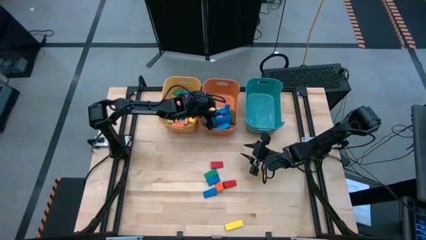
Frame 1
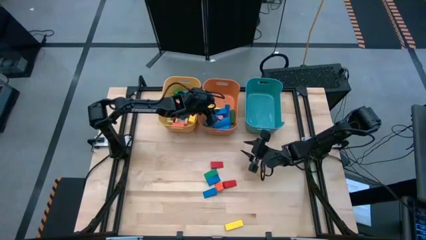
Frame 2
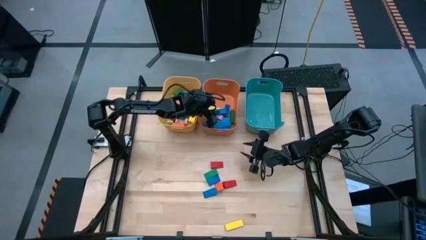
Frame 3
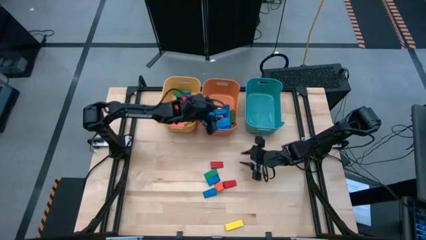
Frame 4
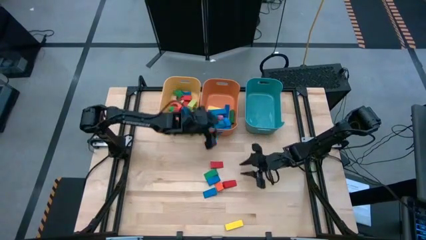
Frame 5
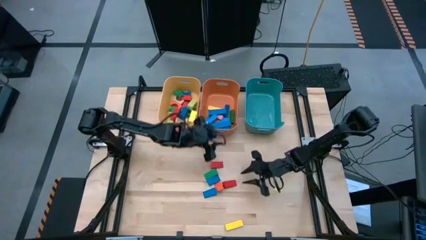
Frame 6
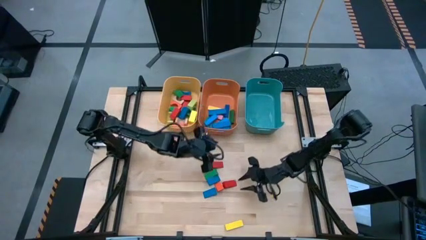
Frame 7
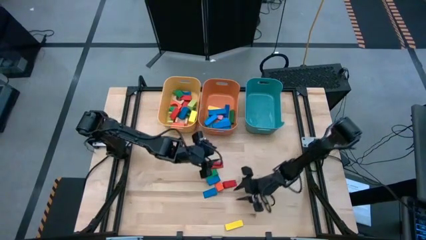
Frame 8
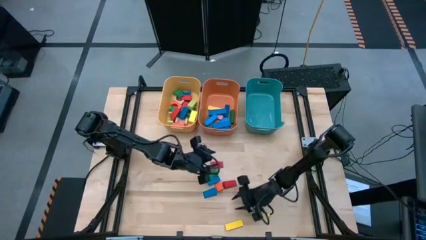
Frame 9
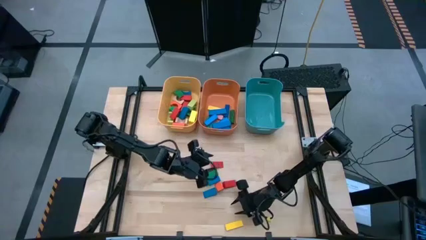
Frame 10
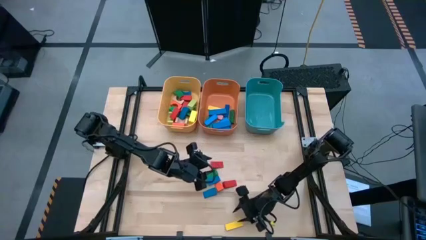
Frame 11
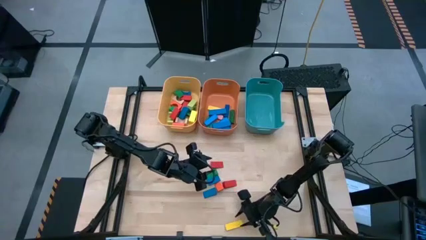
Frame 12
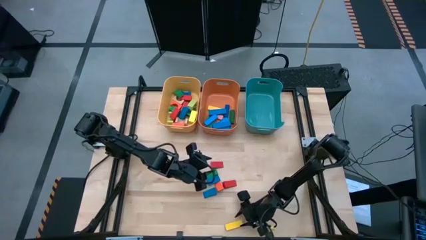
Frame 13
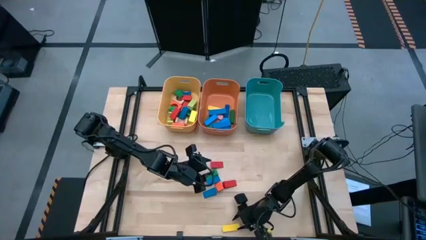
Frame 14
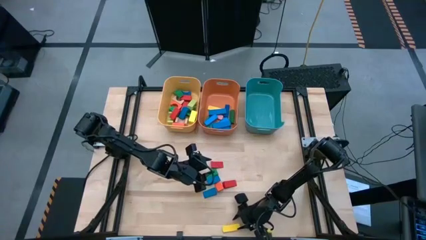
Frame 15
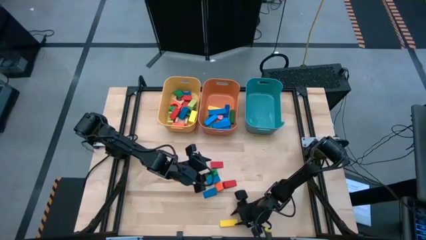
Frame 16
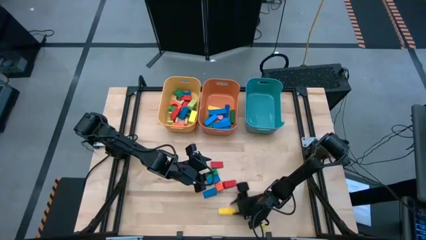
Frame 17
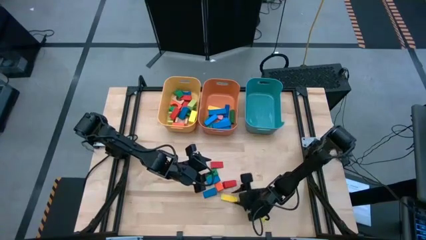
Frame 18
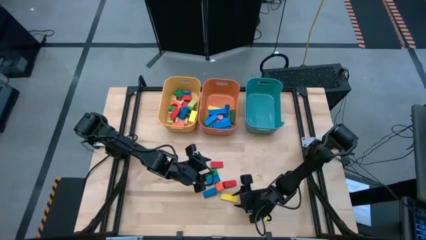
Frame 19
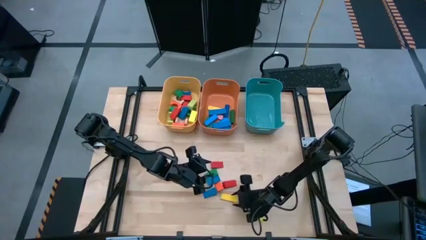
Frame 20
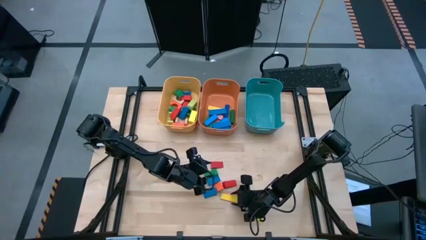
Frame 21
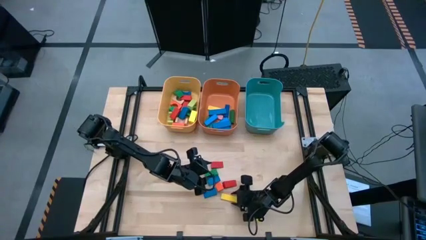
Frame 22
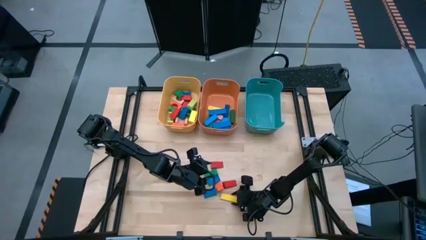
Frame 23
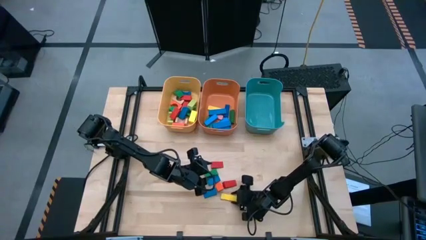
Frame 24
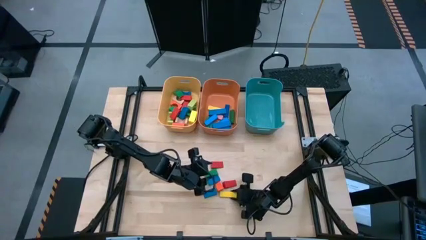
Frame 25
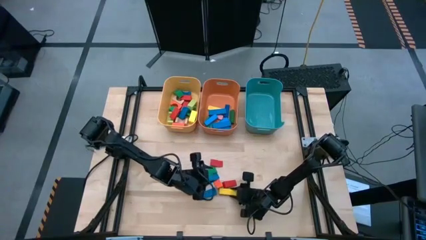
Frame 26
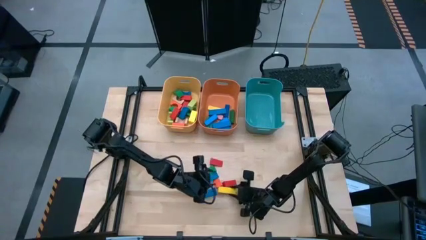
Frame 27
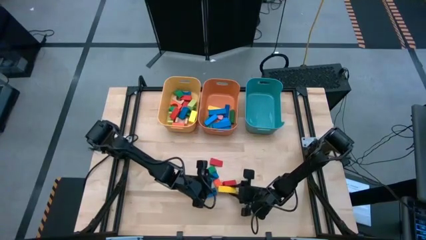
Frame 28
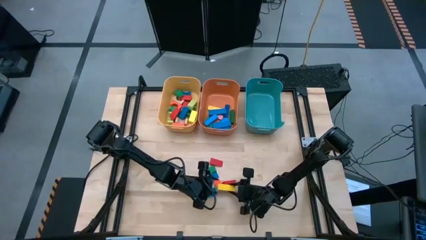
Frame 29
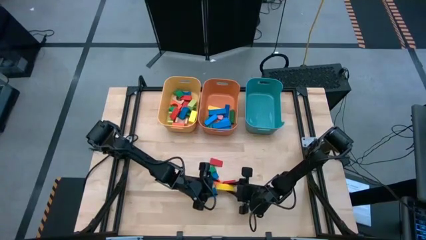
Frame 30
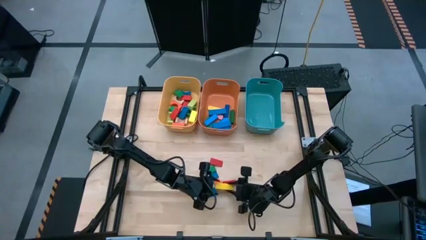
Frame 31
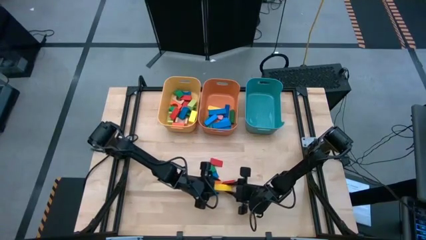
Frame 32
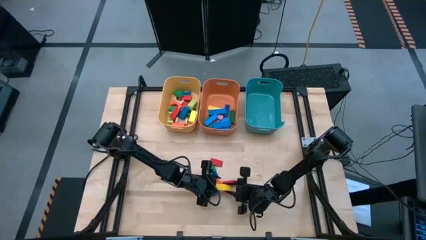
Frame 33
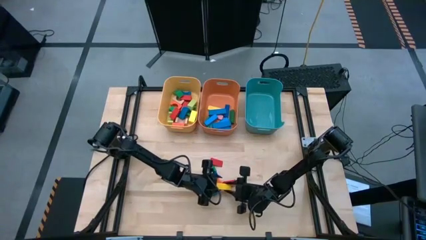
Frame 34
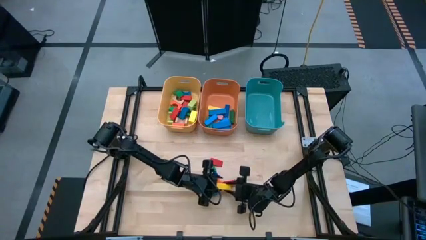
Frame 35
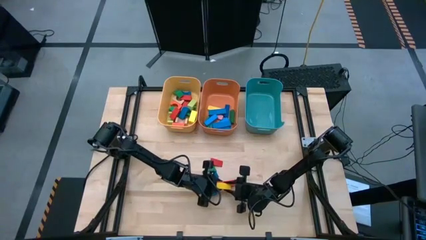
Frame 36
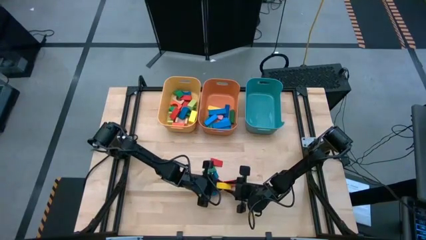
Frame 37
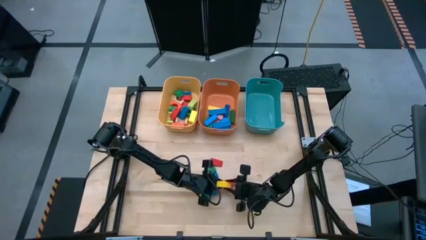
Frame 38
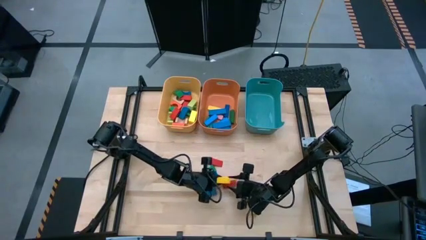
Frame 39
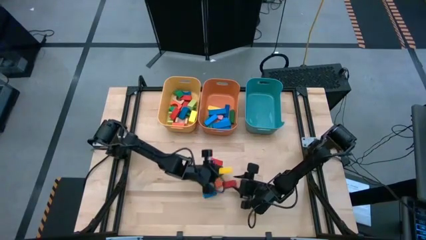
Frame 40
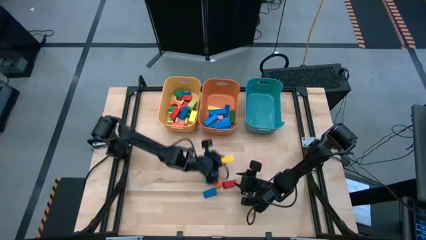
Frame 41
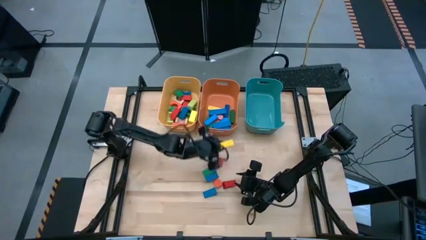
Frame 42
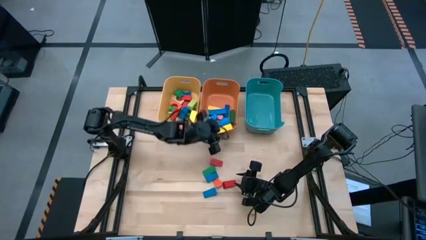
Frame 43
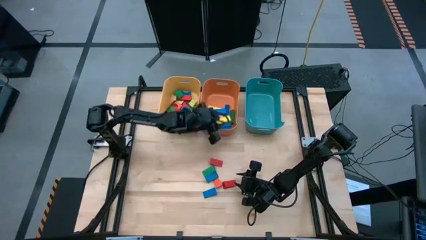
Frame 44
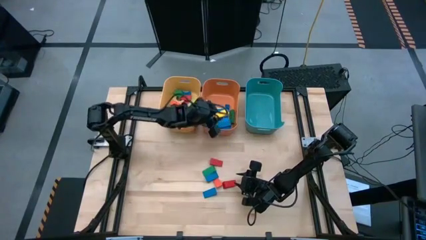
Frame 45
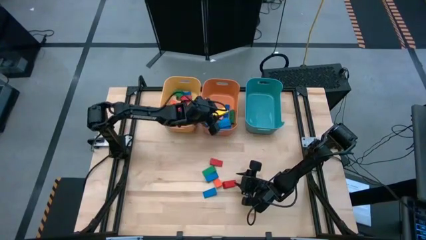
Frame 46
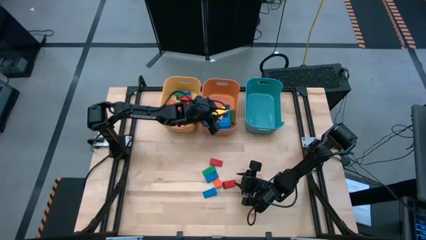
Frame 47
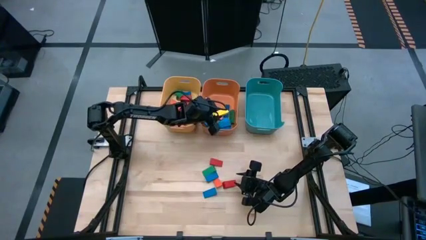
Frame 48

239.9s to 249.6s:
Task: Sort blocks by size
Put the yellow rectangle block into the orange bin

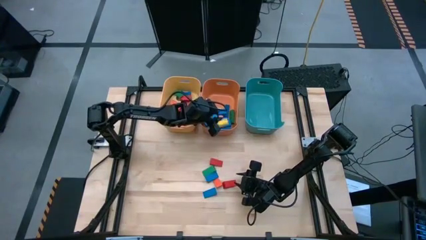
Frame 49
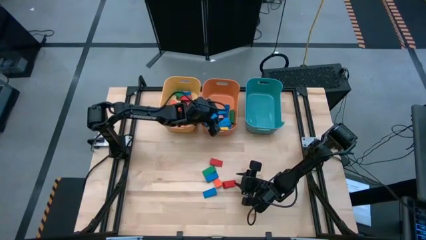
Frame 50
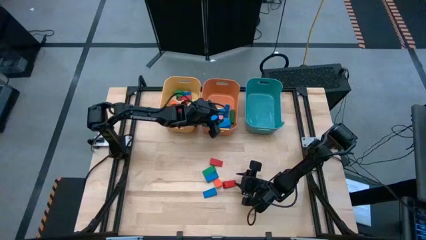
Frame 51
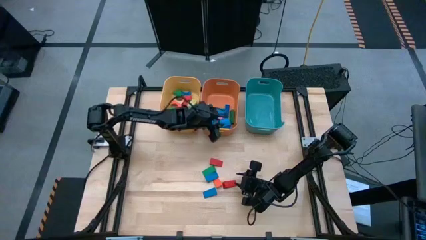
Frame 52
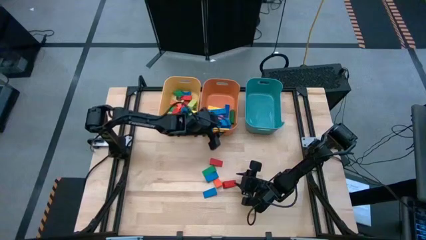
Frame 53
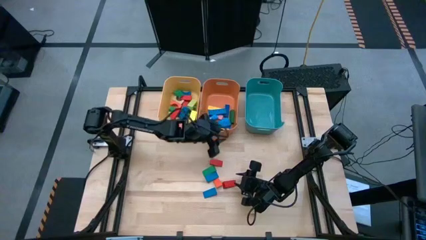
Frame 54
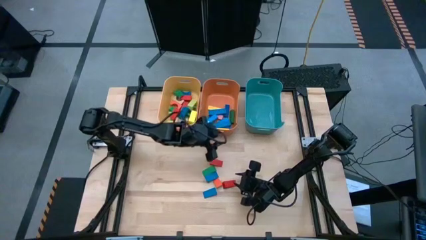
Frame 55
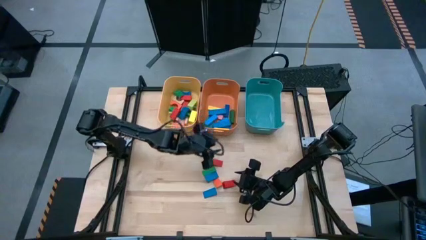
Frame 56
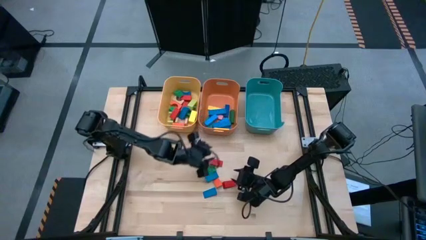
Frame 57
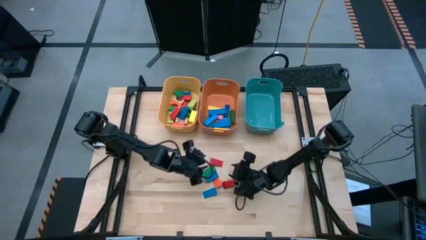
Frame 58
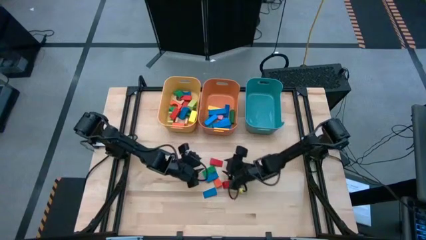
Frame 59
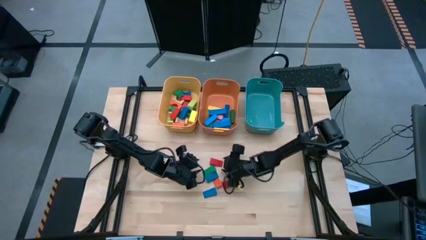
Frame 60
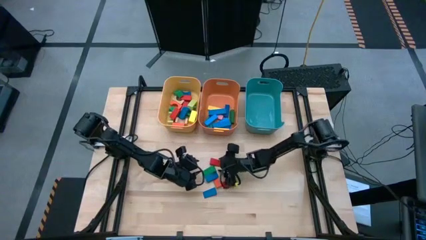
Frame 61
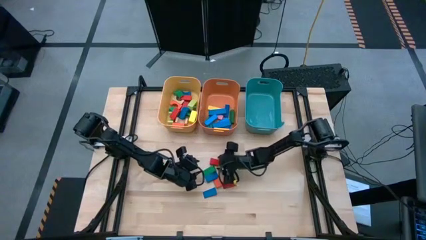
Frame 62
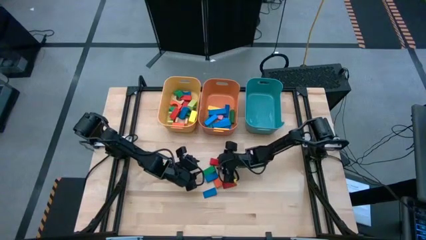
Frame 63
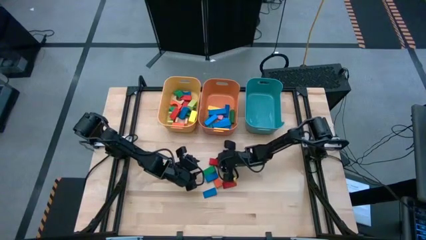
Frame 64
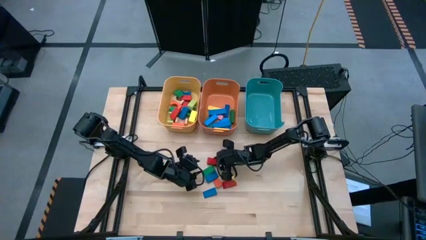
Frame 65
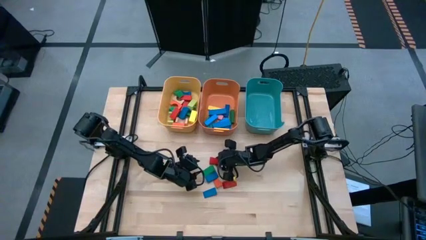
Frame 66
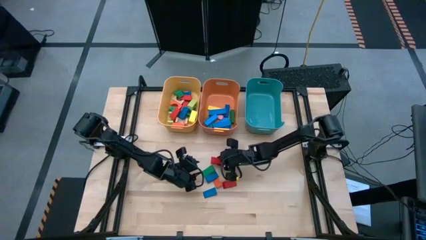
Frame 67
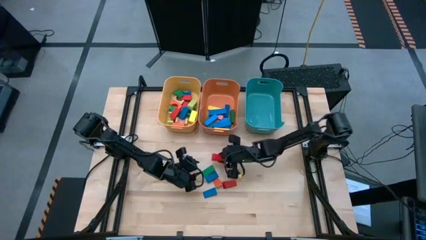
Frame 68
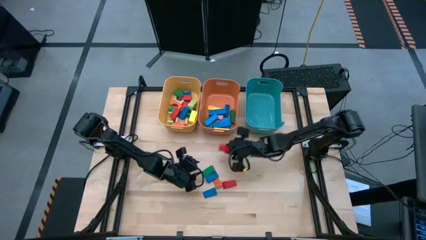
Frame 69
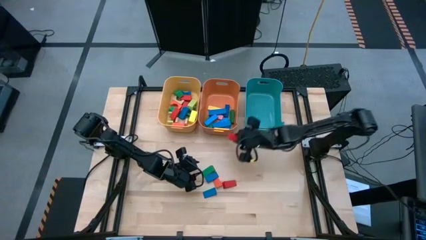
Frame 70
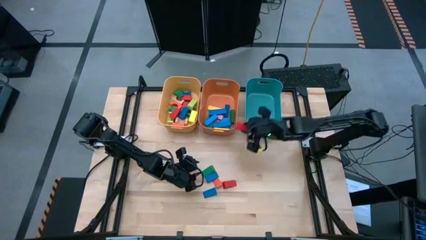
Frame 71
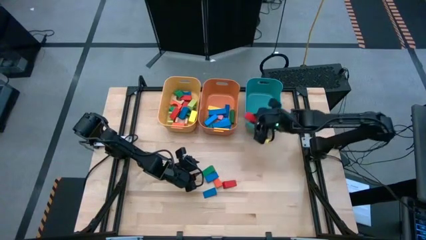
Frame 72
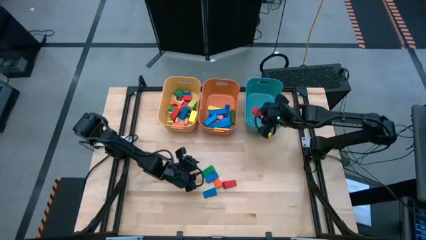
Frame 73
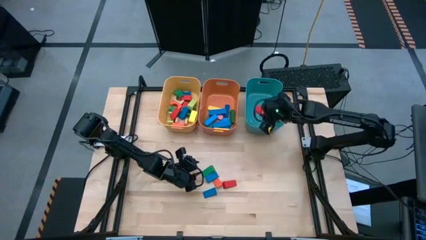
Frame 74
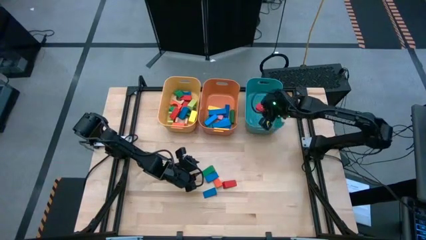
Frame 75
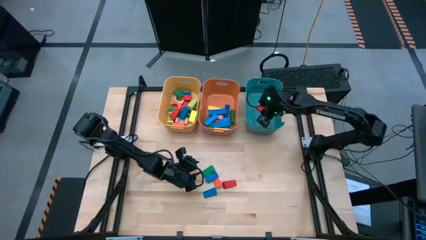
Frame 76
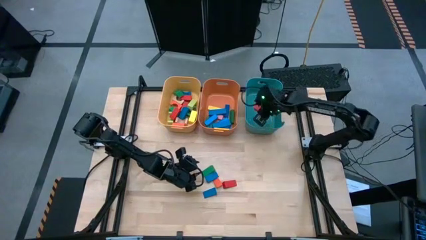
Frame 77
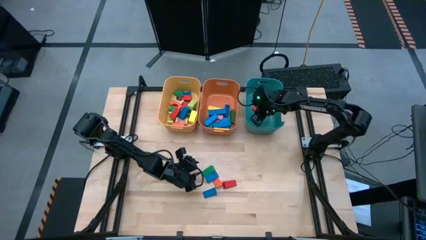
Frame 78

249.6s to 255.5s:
Put the red triangle block into the blue bin
